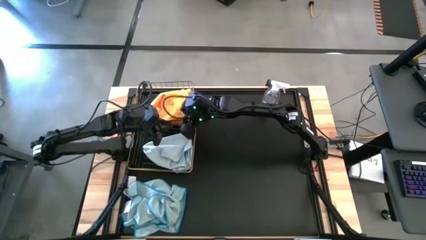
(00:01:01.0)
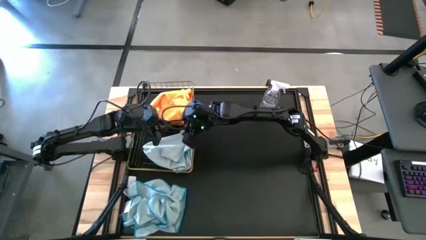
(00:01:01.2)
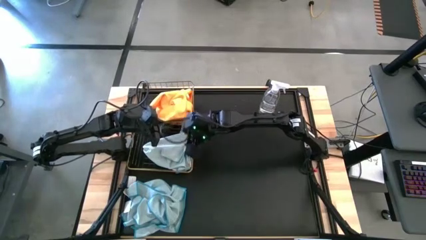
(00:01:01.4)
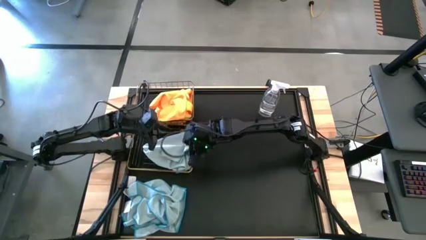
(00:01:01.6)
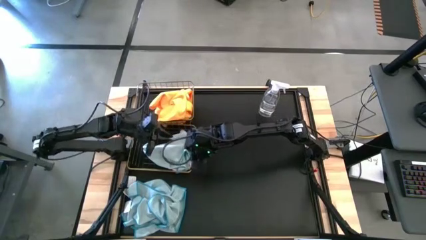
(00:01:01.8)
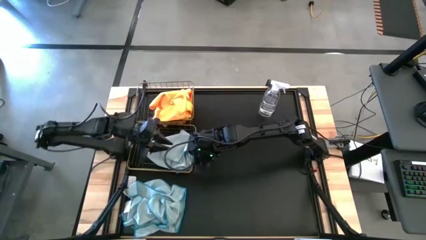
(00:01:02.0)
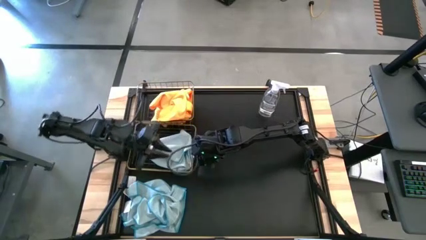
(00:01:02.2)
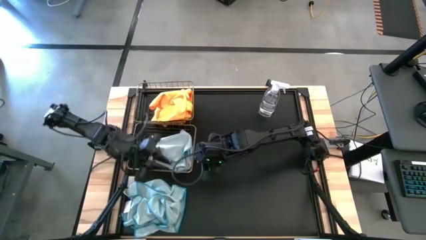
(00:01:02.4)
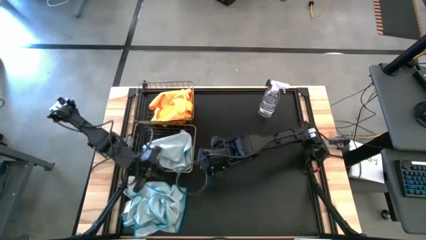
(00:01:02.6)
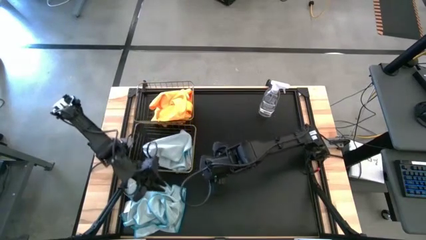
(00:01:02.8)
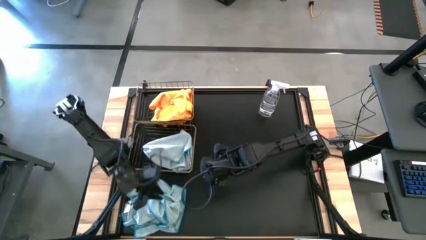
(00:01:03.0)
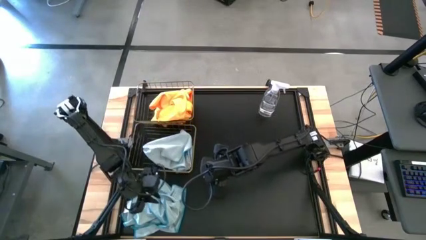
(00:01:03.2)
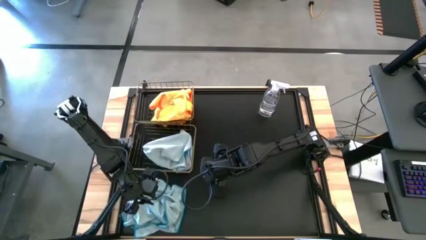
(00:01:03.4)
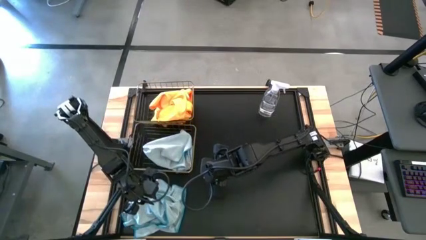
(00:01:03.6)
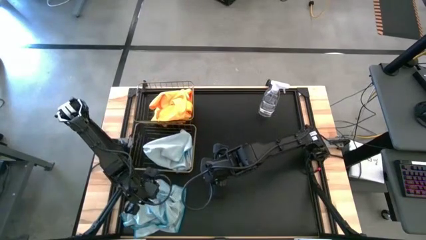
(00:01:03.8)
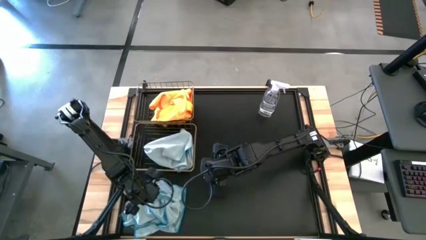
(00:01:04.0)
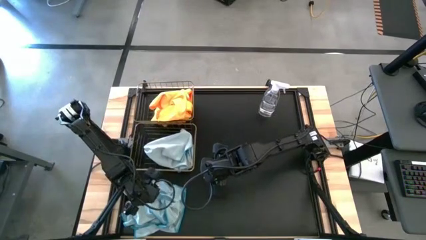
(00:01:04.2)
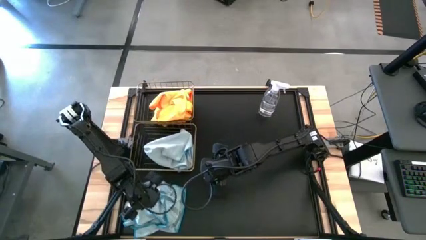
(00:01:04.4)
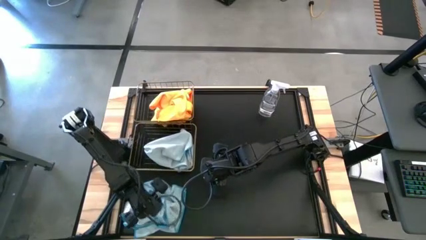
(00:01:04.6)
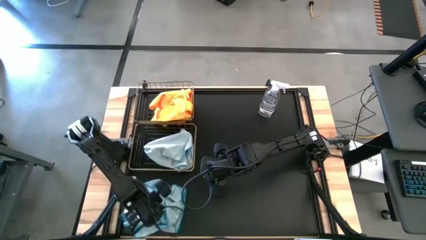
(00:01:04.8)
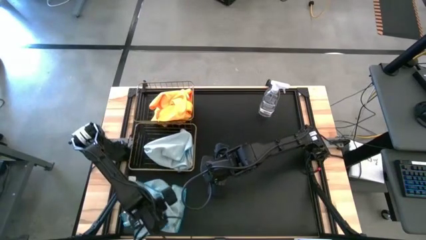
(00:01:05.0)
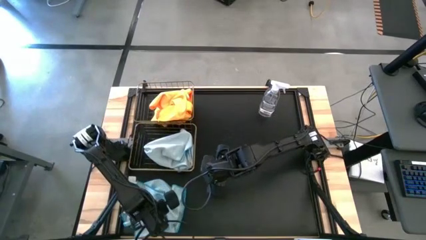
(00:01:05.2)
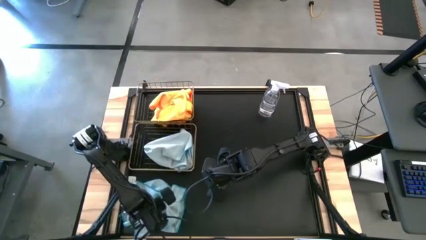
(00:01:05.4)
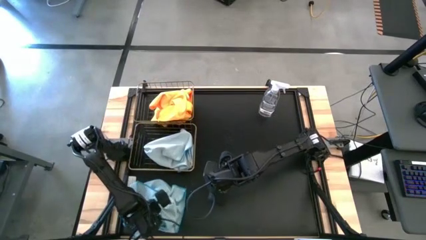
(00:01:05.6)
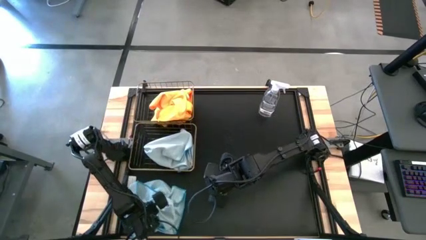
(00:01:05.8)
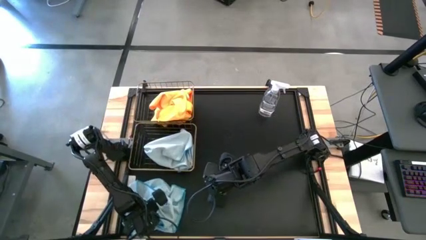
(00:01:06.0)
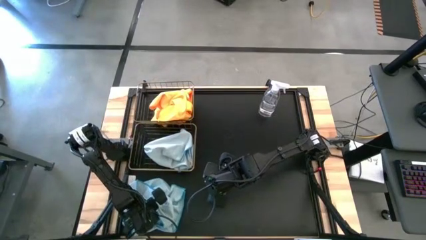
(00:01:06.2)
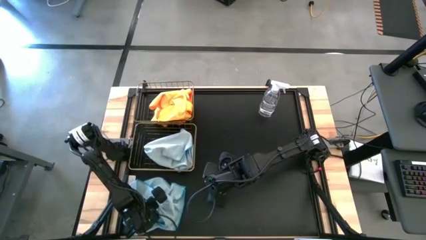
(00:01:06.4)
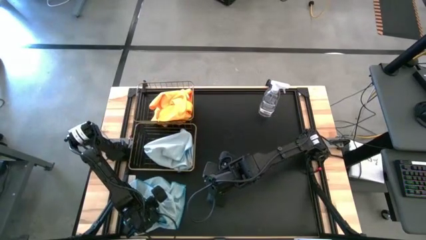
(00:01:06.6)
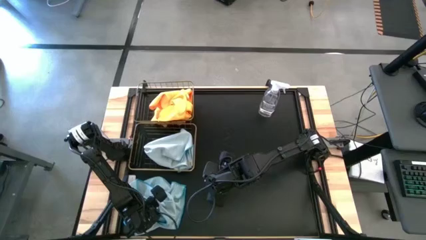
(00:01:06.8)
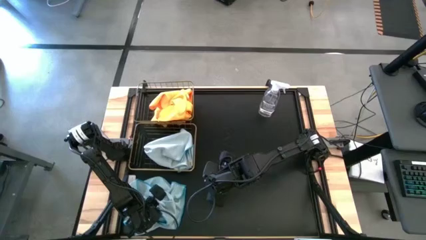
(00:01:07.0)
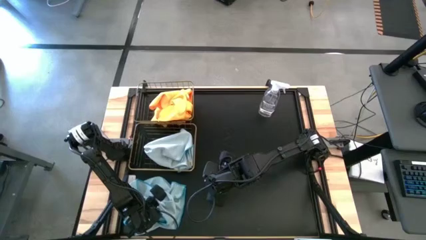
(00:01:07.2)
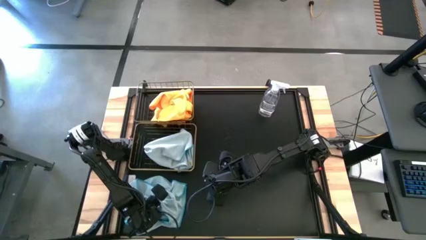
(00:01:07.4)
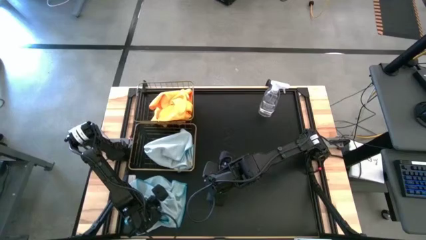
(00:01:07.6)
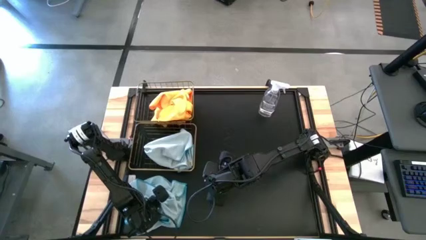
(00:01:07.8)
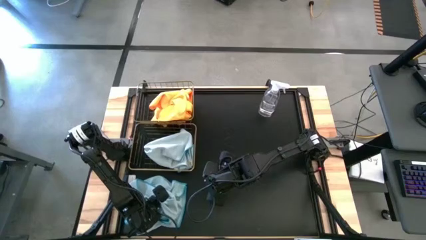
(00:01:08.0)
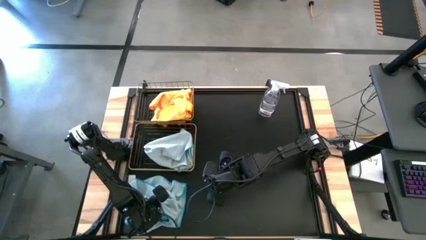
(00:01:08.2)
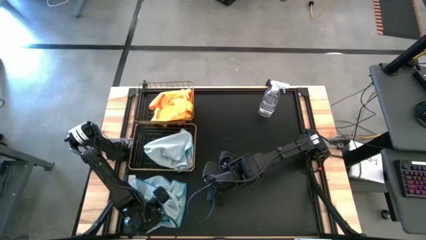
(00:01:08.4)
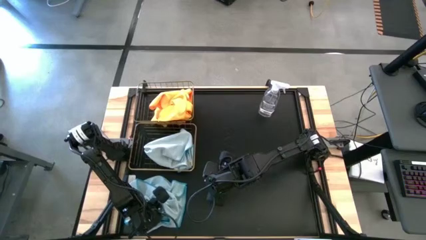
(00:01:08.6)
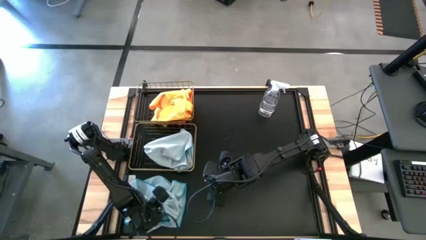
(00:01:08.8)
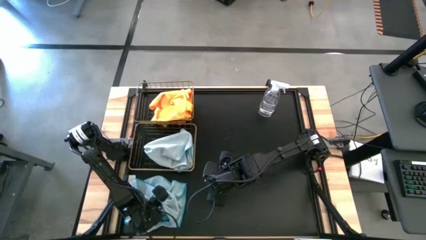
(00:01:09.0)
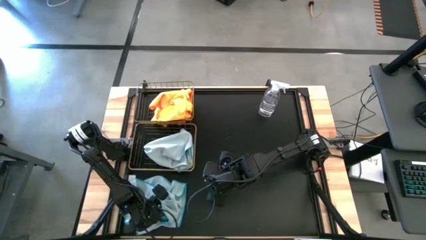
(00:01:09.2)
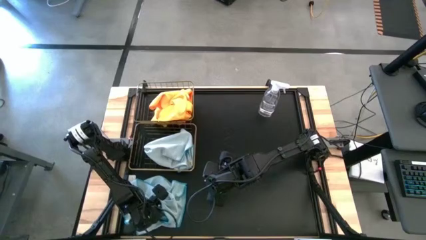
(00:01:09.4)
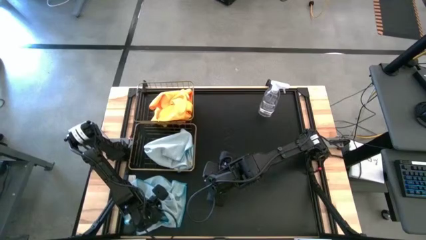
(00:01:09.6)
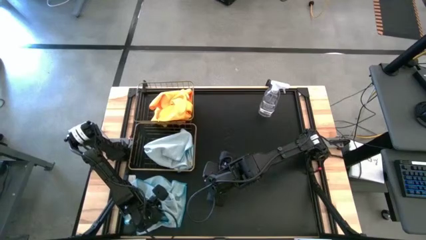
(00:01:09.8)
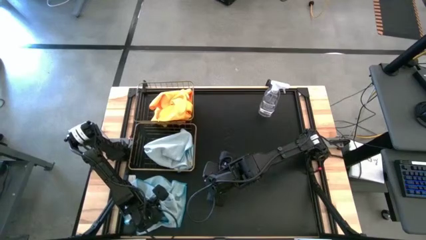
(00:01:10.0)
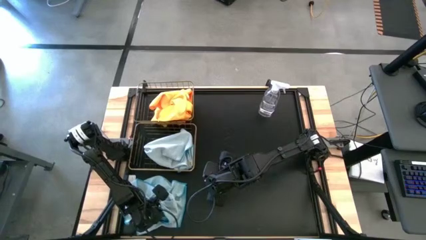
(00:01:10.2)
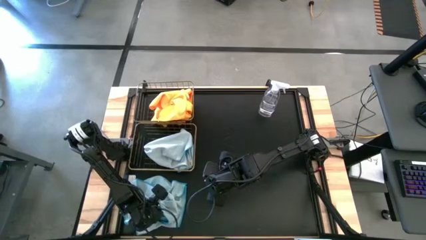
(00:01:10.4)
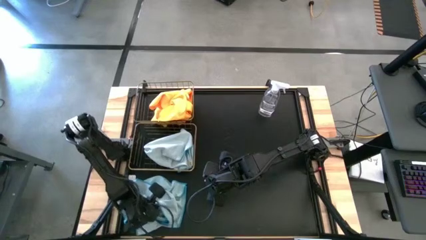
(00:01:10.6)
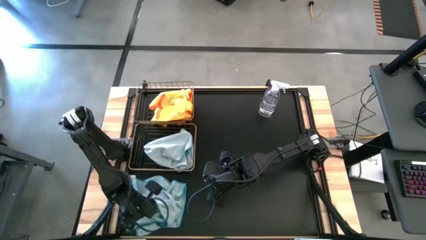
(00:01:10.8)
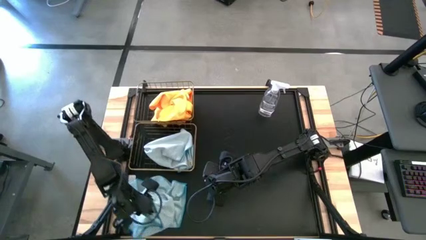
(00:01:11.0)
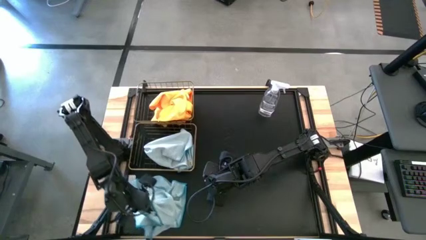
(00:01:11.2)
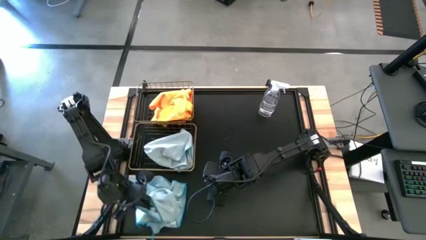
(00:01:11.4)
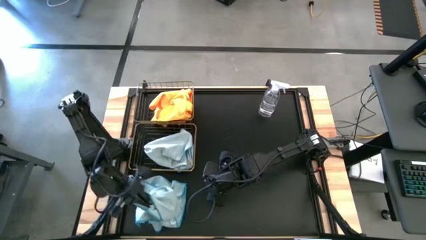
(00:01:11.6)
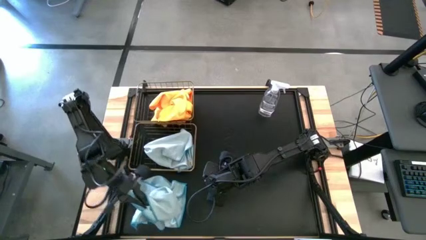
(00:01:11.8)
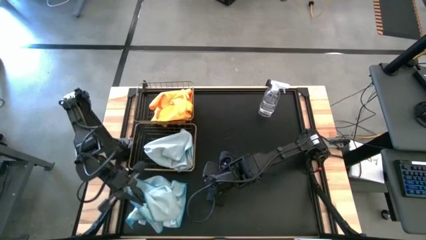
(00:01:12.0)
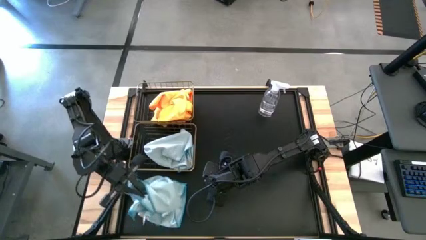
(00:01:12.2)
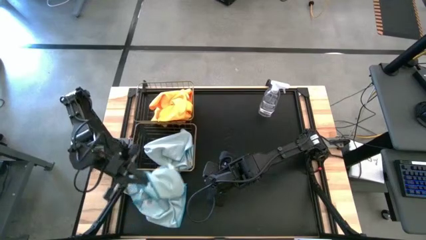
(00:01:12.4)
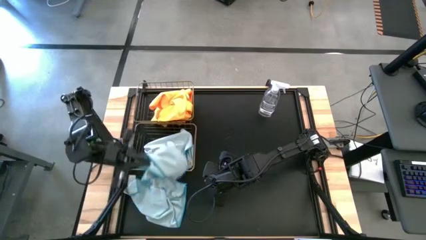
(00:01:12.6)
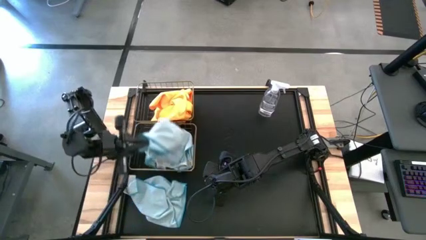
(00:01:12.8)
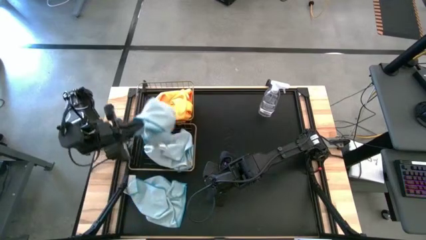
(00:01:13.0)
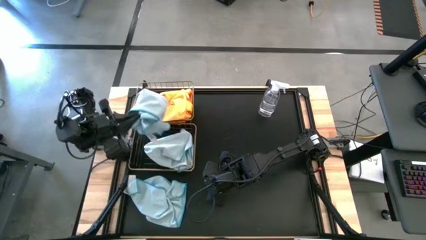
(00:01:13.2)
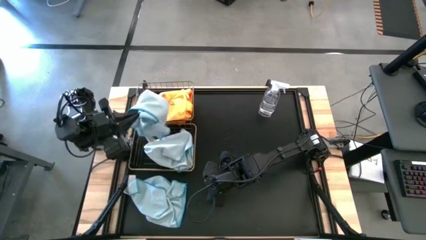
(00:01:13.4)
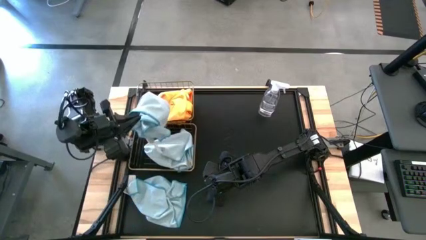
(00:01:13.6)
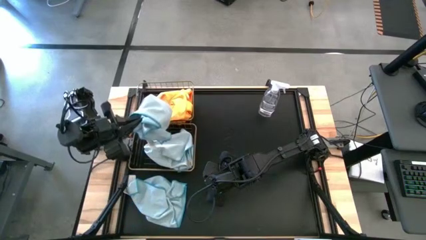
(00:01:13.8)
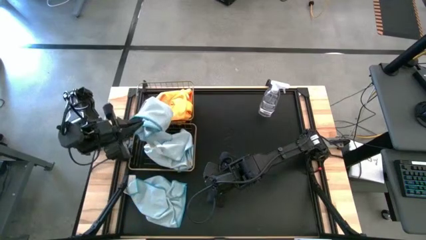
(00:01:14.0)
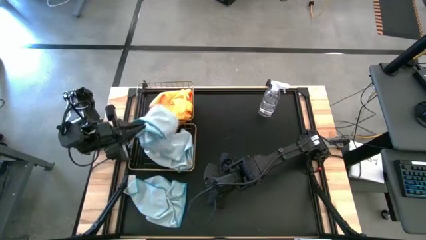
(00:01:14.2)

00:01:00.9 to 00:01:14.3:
Task: Sort microfiber towel by color & place in baskets
Put the blue towel into the bottom wire basket

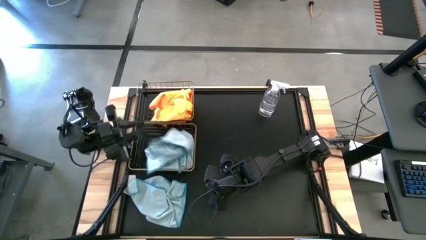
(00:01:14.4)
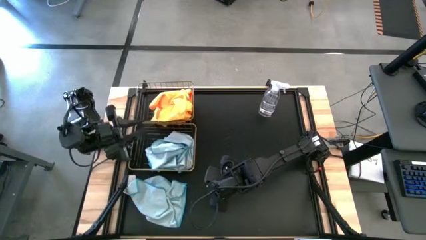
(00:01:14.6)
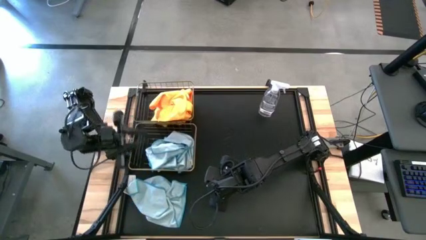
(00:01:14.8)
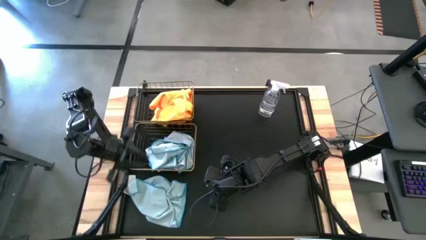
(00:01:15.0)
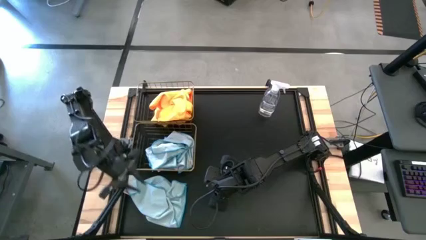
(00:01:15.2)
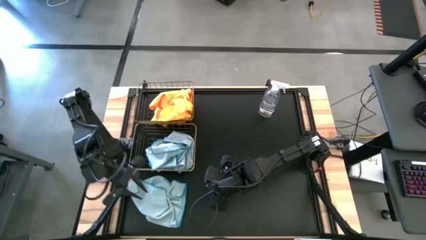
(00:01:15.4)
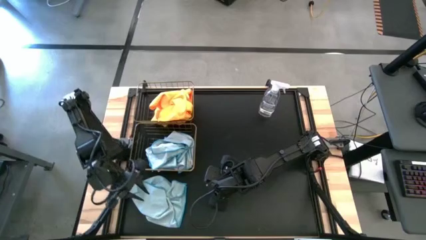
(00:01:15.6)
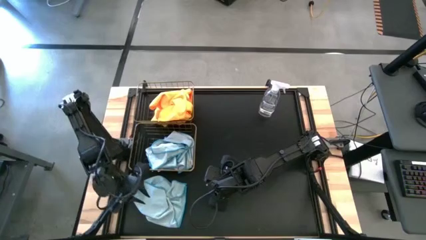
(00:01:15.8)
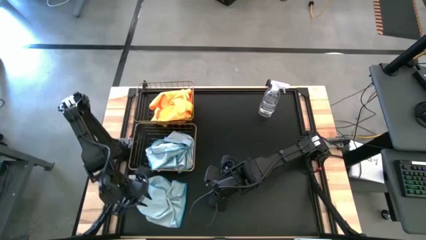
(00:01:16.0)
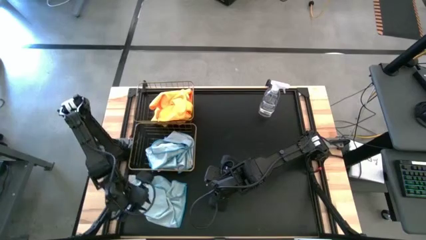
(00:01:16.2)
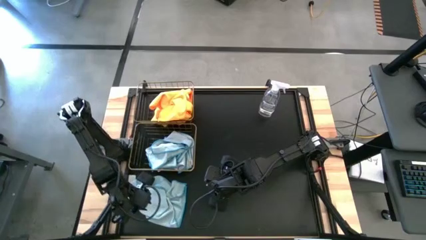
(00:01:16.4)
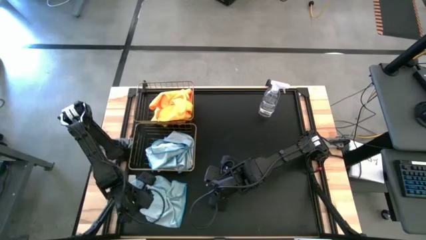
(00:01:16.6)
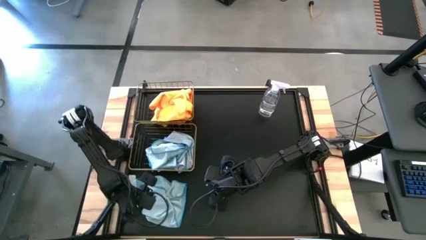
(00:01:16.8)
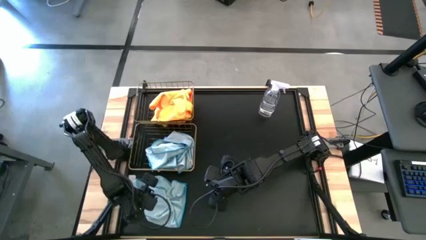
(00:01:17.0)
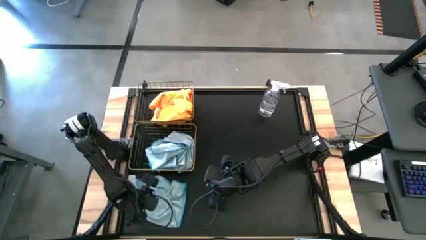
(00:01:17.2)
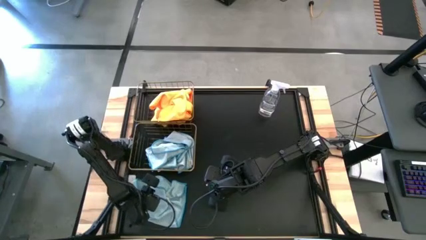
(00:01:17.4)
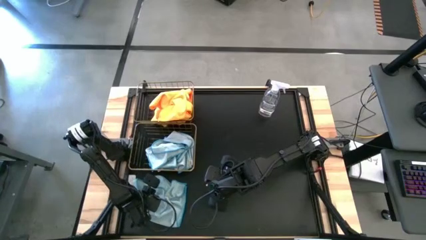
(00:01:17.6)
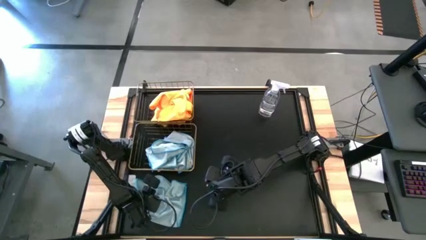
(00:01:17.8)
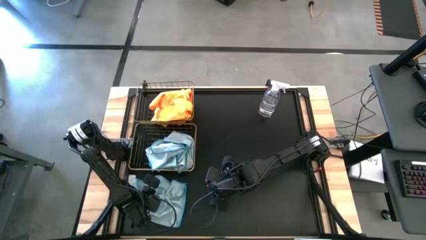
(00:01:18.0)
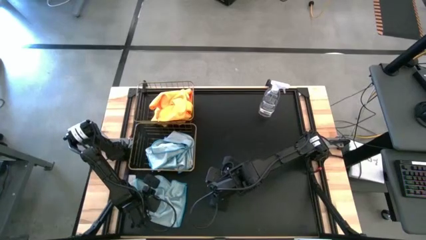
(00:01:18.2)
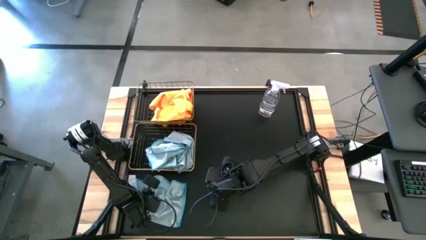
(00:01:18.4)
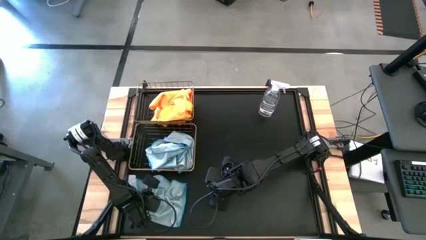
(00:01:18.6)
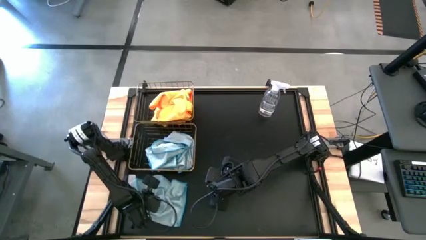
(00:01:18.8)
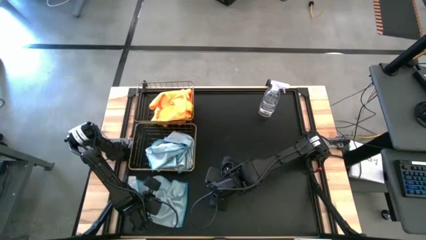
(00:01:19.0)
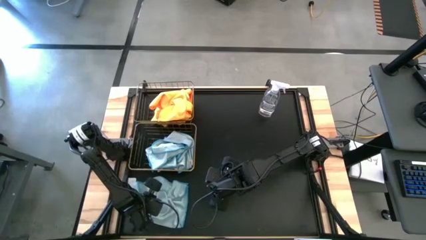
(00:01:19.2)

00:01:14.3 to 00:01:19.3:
Put the blue towel into the bottom wire basket
